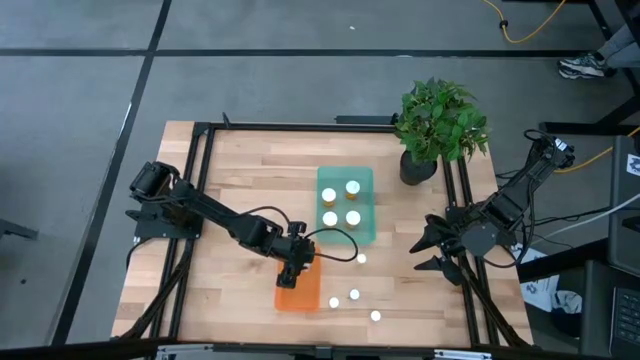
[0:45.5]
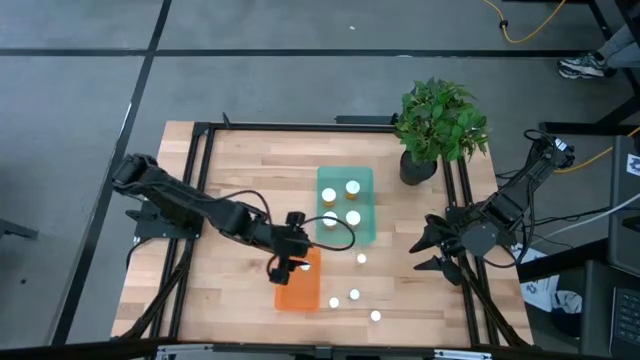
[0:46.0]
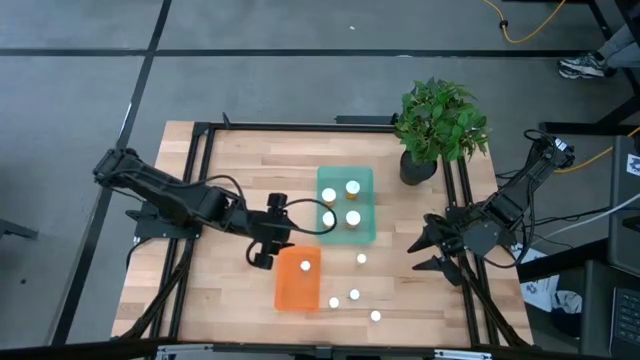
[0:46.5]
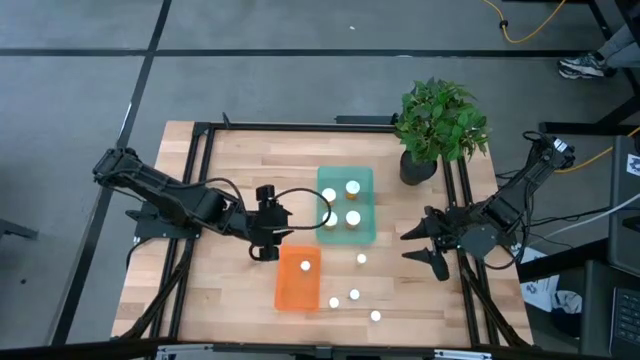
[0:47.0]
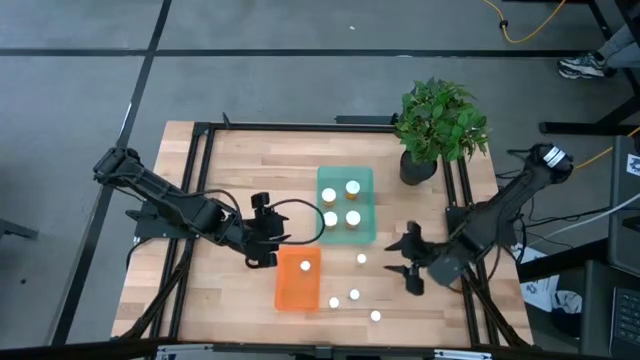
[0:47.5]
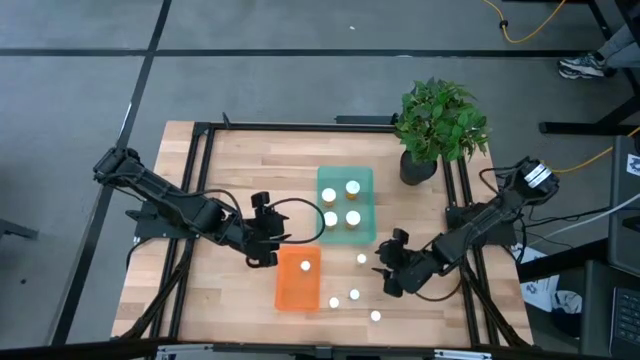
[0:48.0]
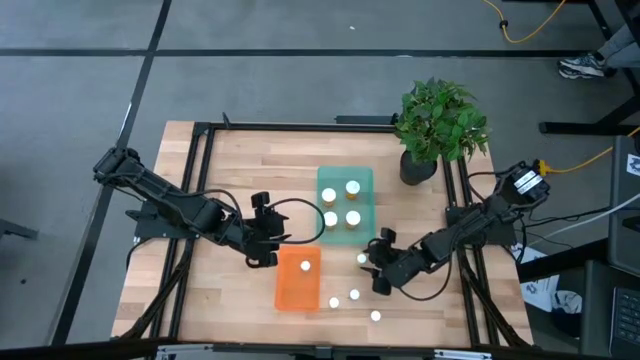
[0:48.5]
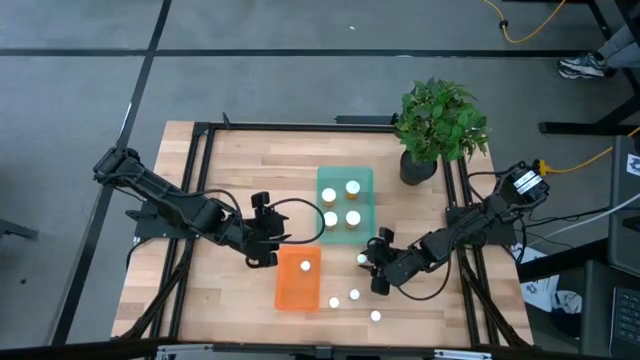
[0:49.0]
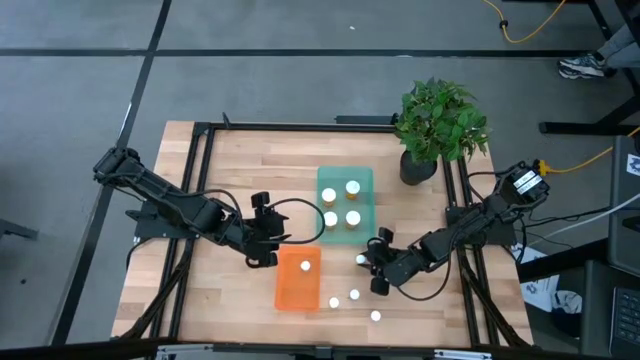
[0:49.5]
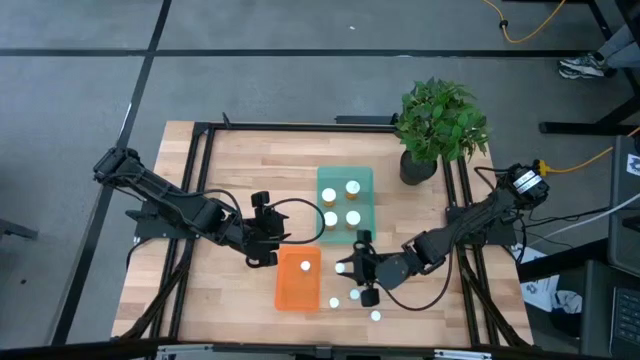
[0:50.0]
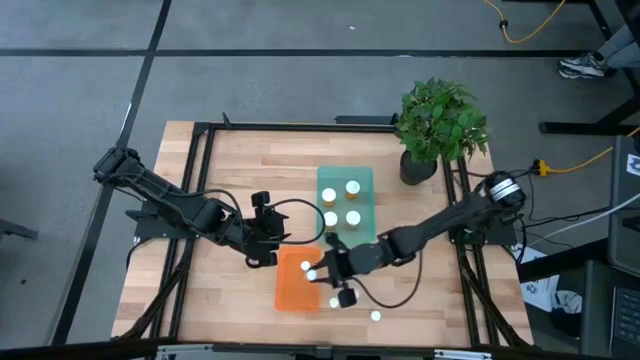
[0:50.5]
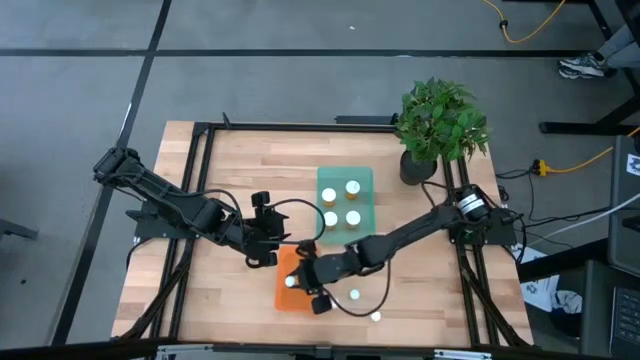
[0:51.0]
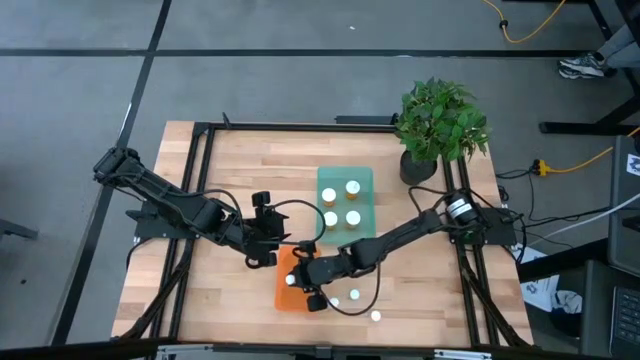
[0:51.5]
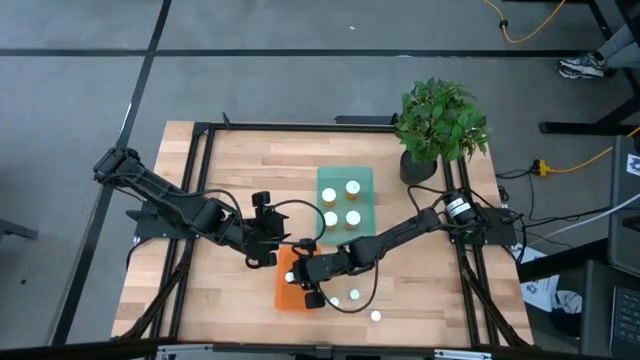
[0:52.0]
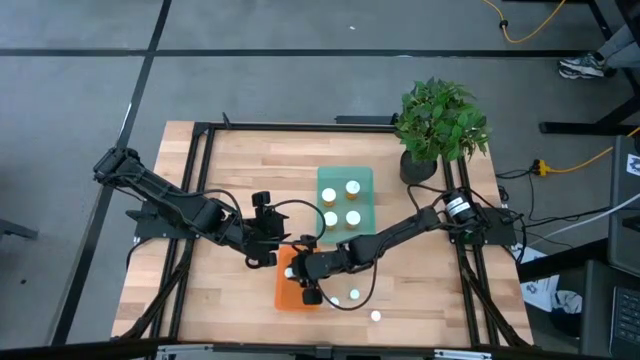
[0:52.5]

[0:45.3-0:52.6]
Task: Pick and place medicine bottles into bin by pill shape (circle, oval)
Put the top small yellow pill bottle into the orange bin

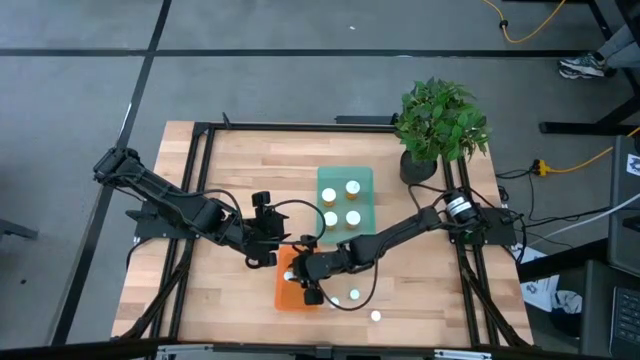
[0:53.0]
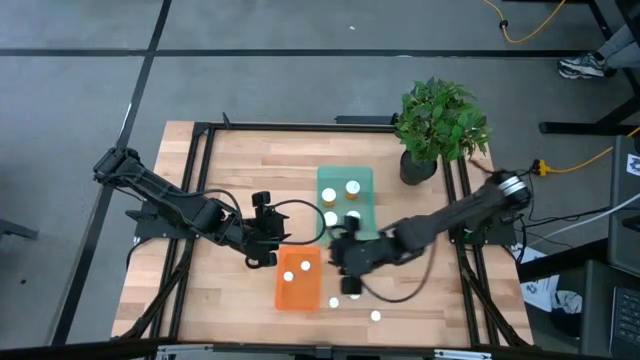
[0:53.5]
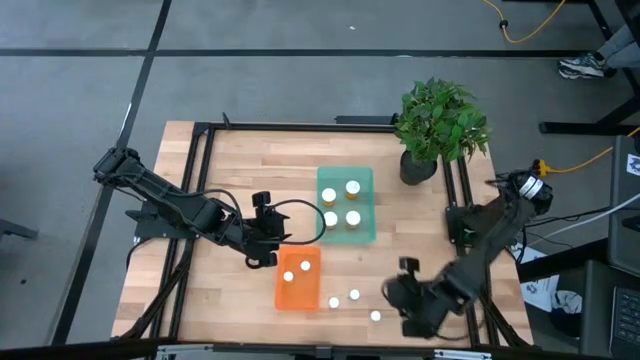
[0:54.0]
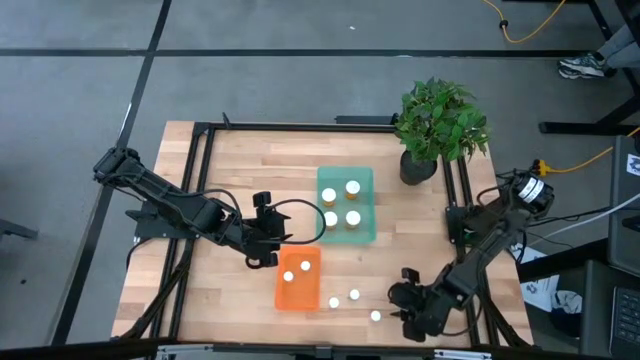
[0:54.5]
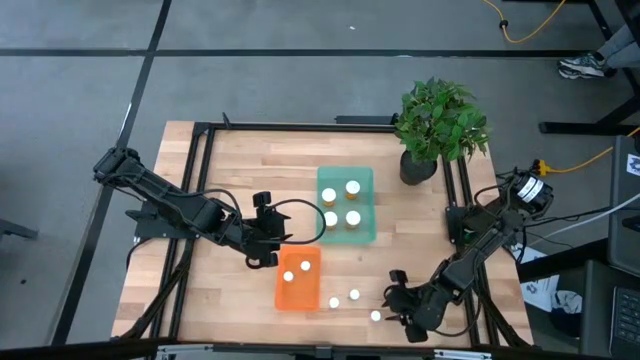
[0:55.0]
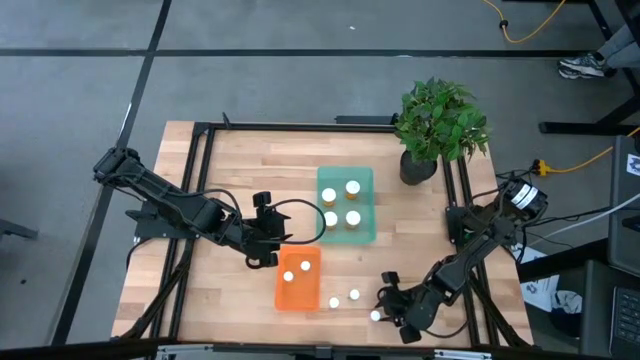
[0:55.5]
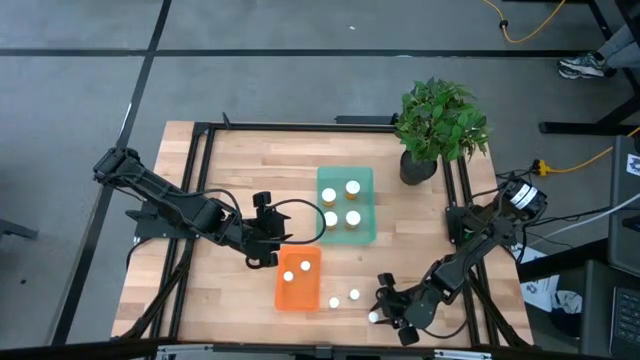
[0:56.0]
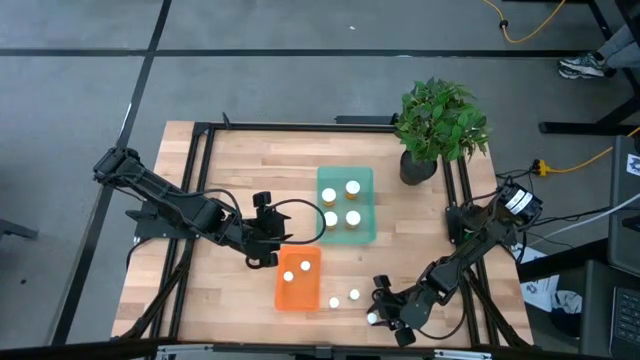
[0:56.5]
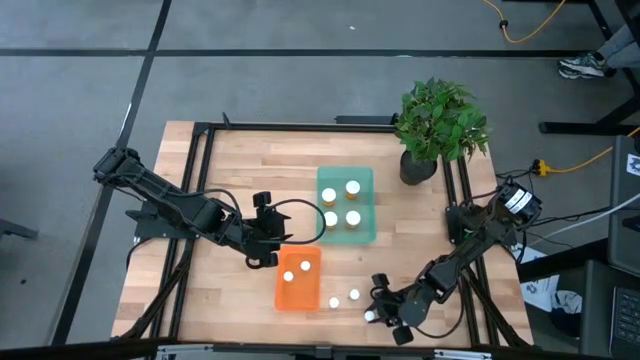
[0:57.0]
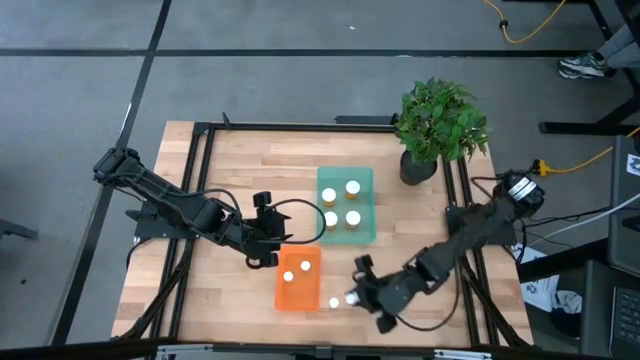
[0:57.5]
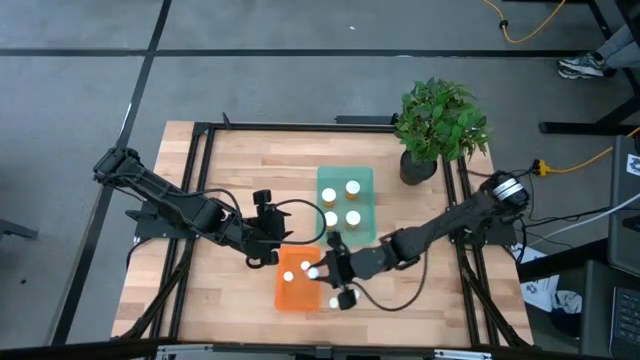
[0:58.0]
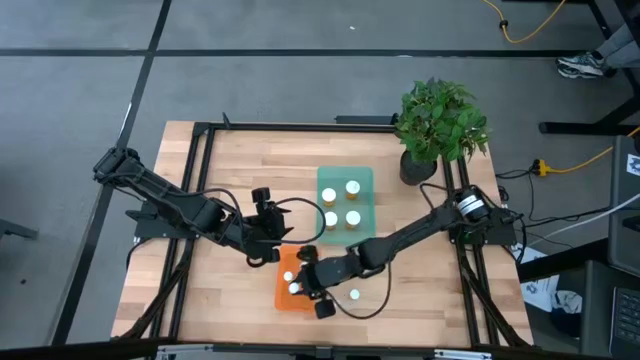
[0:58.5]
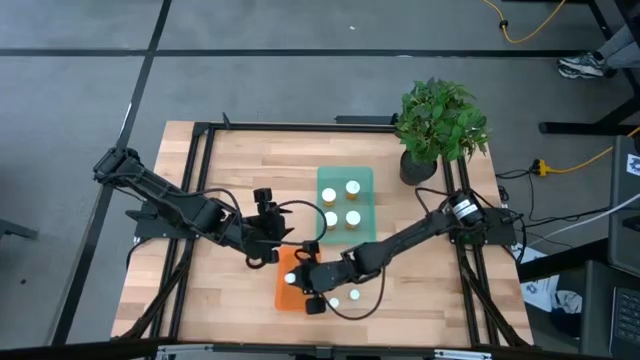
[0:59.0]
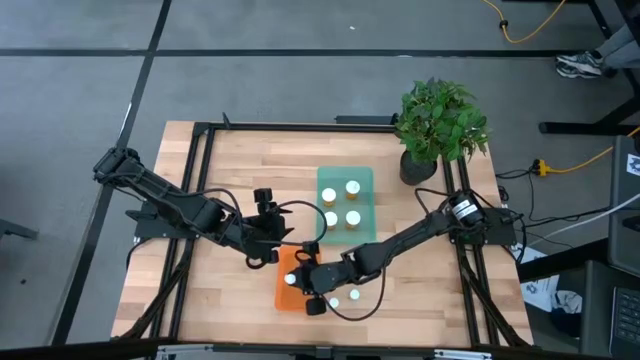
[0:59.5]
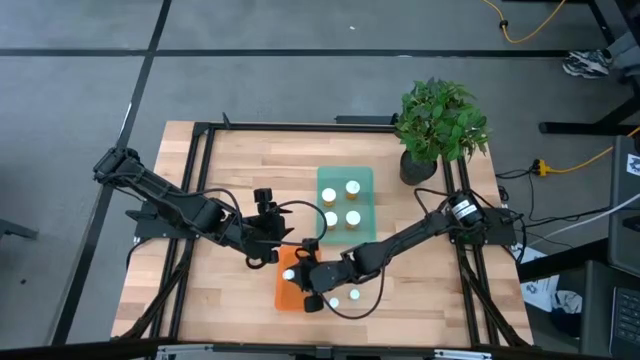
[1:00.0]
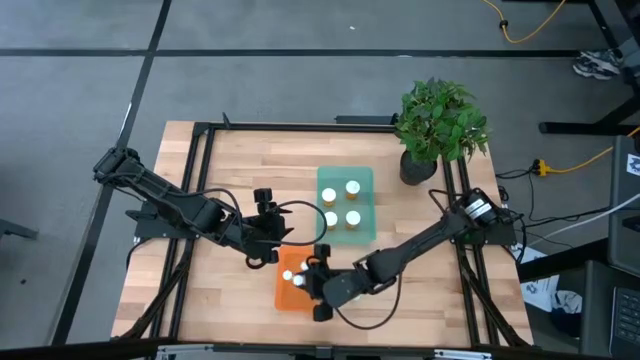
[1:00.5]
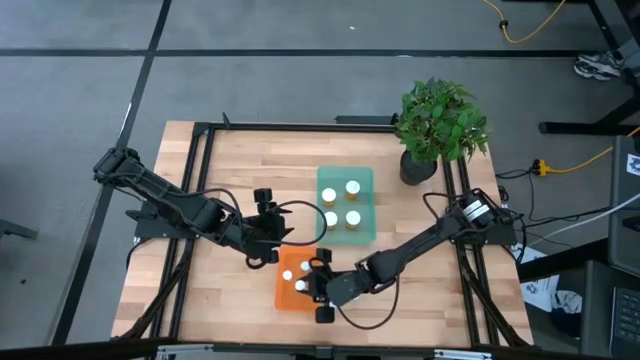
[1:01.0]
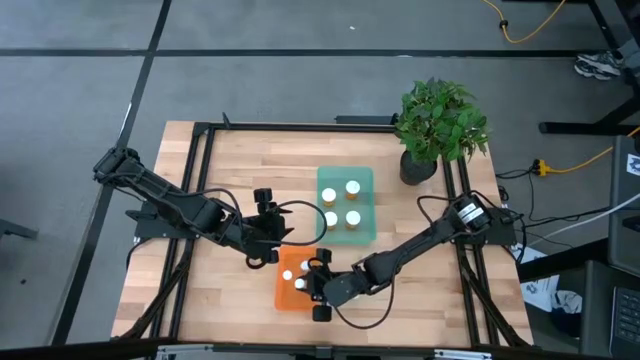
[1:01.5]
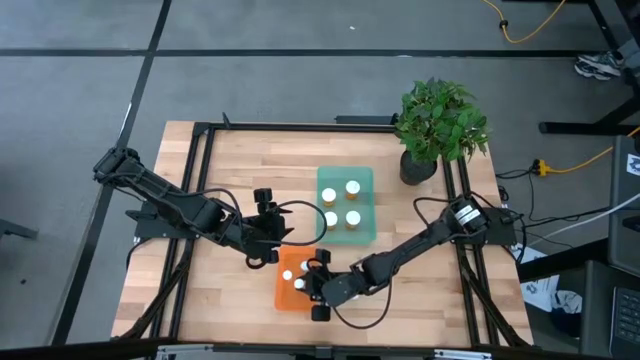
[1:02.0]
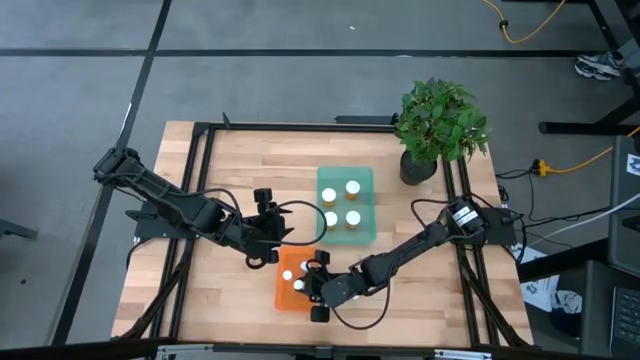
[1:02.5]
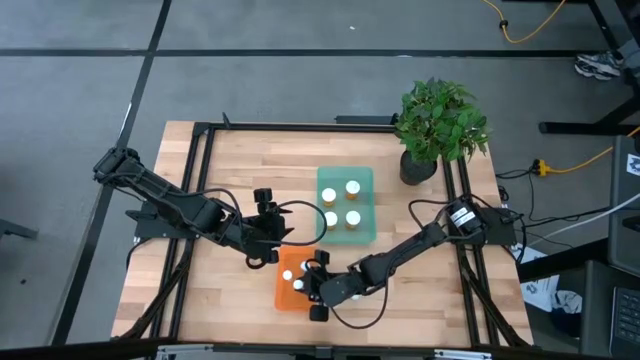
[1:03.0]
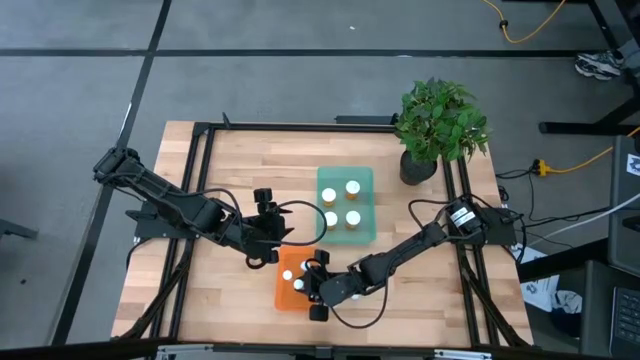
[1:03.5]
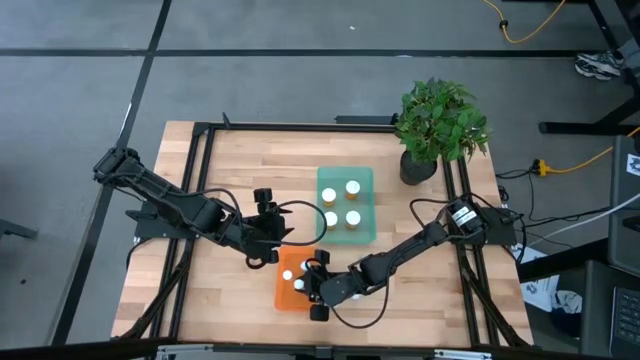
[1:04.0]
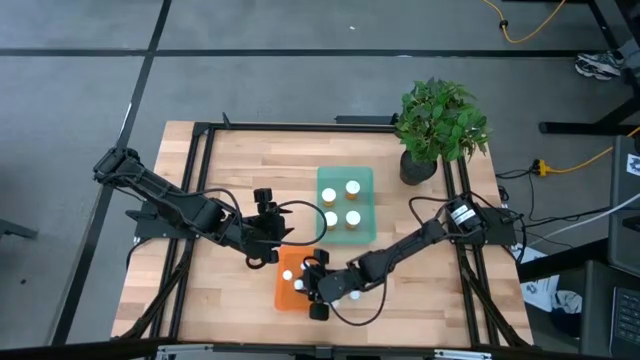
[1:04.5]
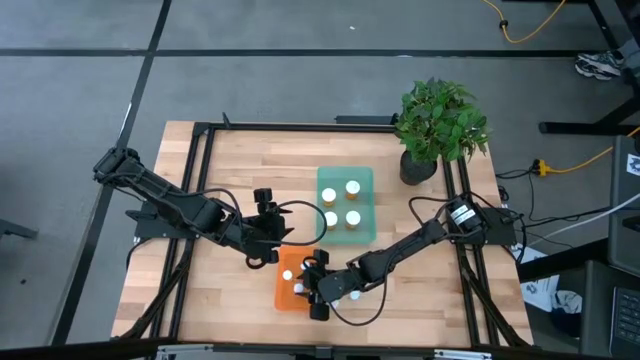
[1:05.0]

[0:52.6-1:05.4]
Put the small pink pill bottle into the orange bin
